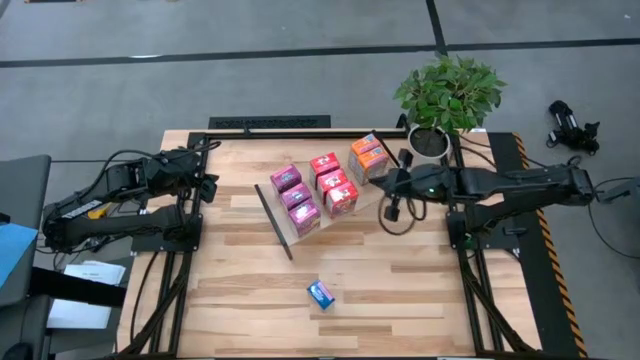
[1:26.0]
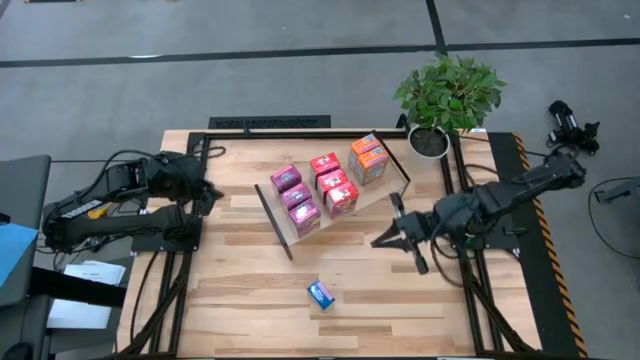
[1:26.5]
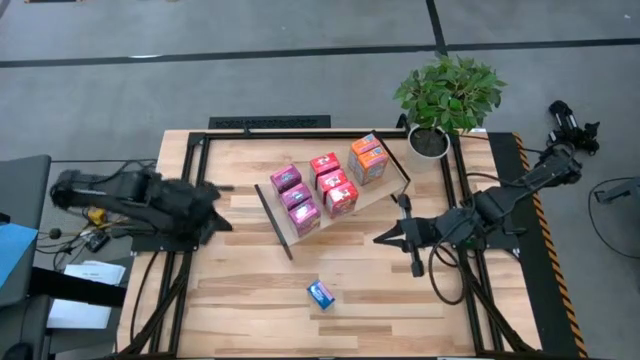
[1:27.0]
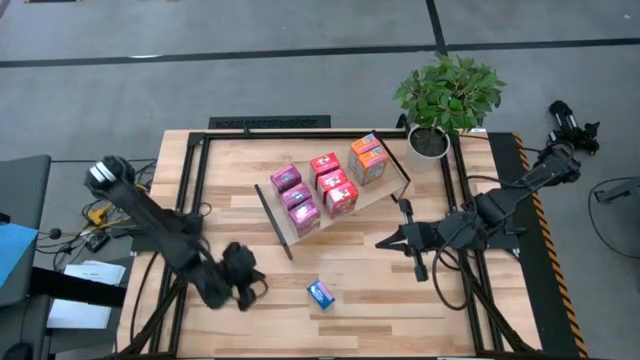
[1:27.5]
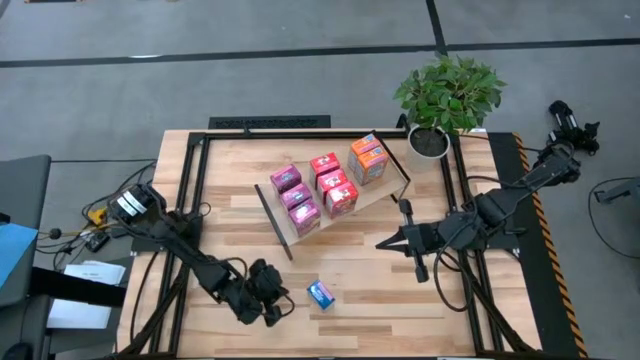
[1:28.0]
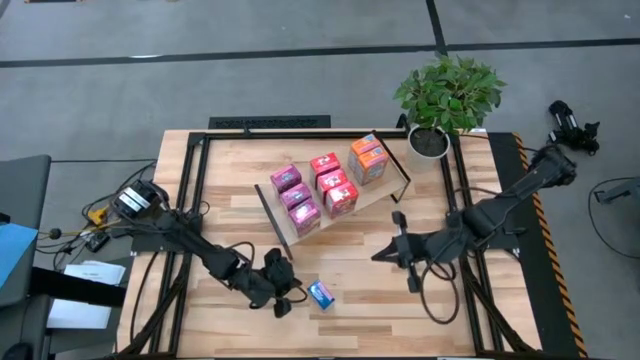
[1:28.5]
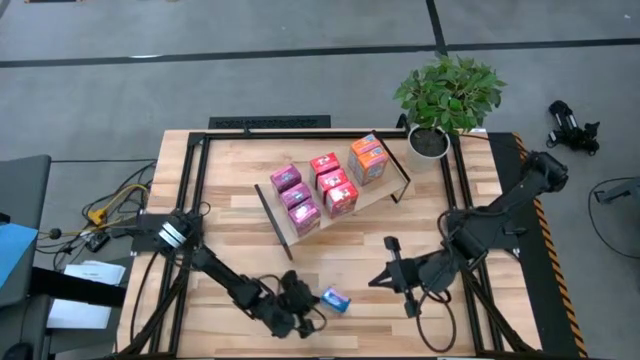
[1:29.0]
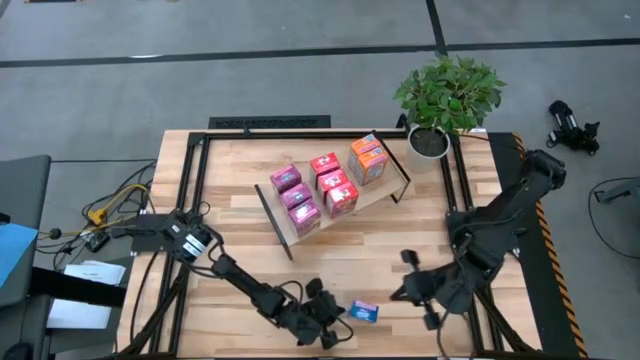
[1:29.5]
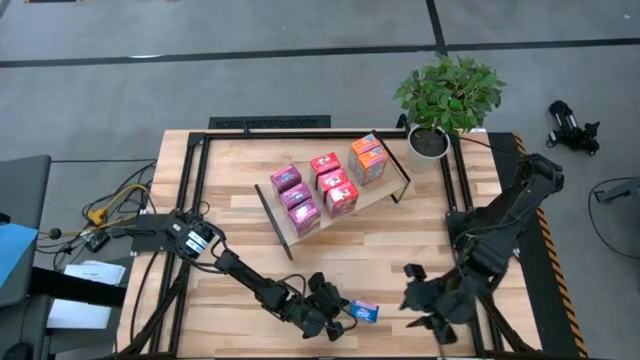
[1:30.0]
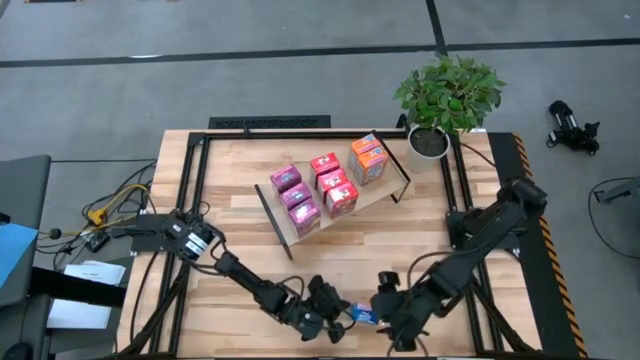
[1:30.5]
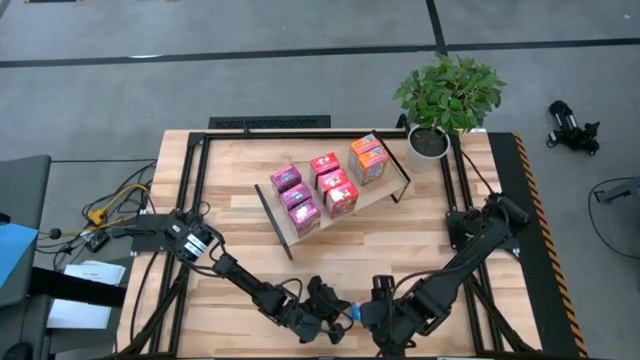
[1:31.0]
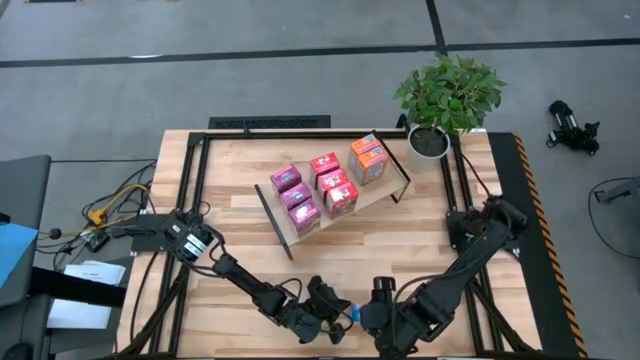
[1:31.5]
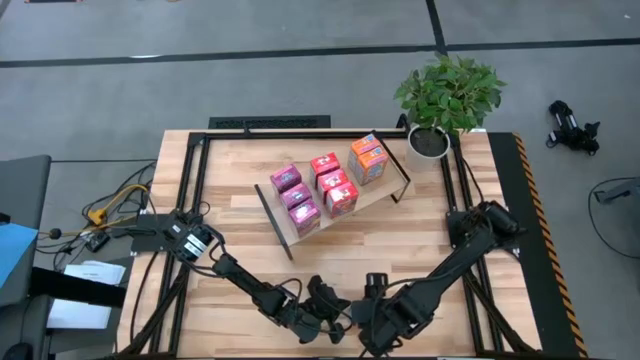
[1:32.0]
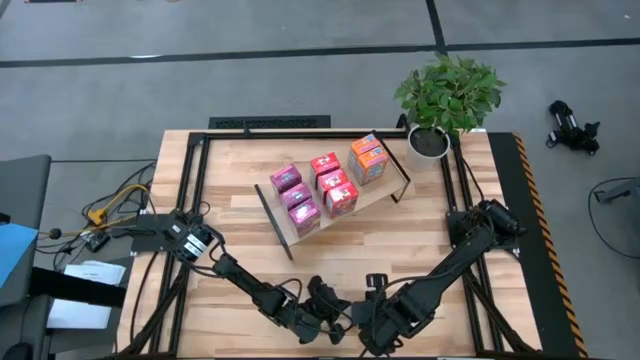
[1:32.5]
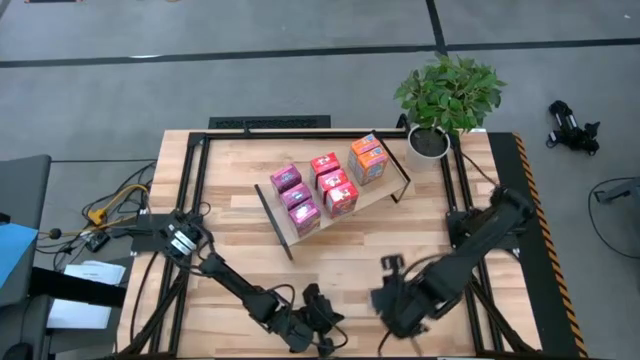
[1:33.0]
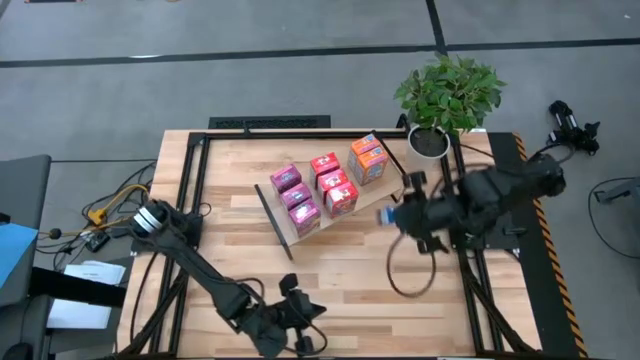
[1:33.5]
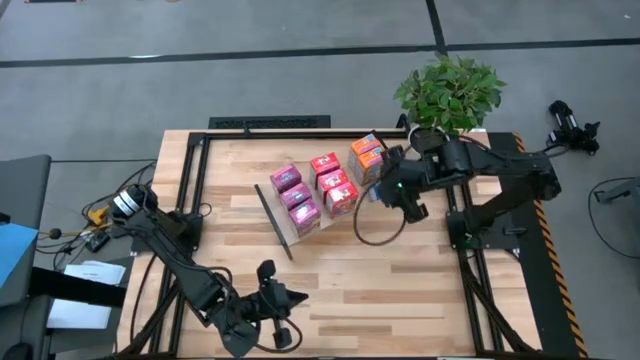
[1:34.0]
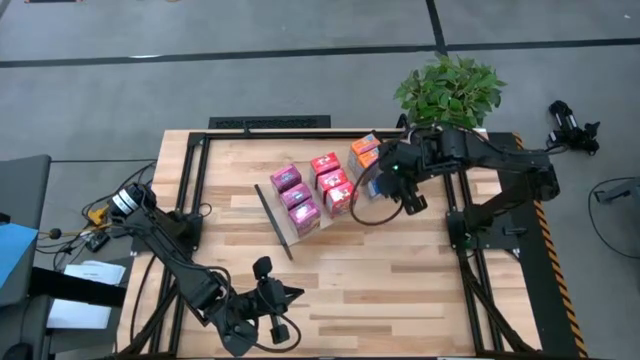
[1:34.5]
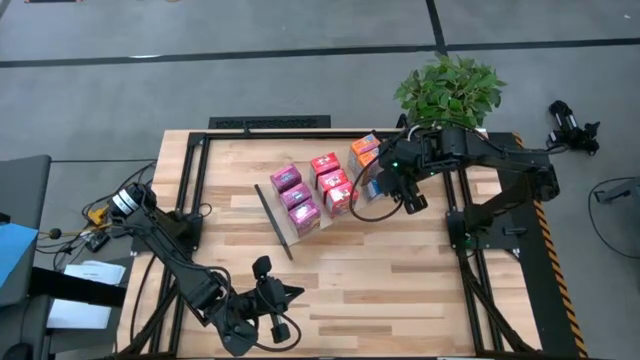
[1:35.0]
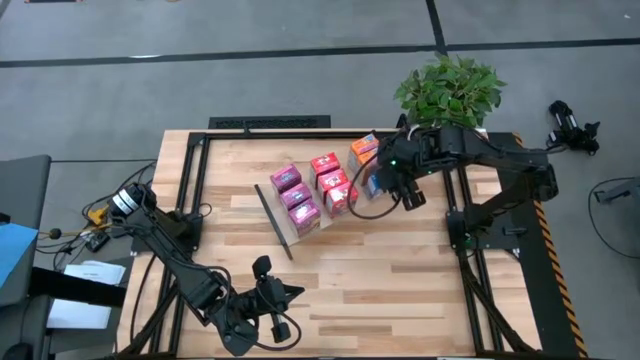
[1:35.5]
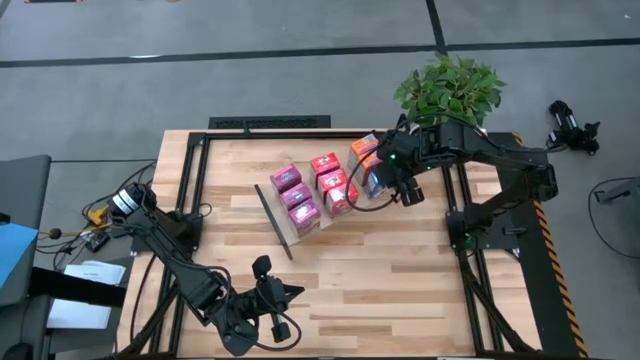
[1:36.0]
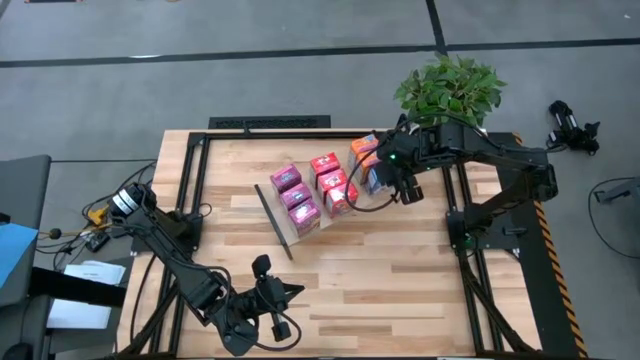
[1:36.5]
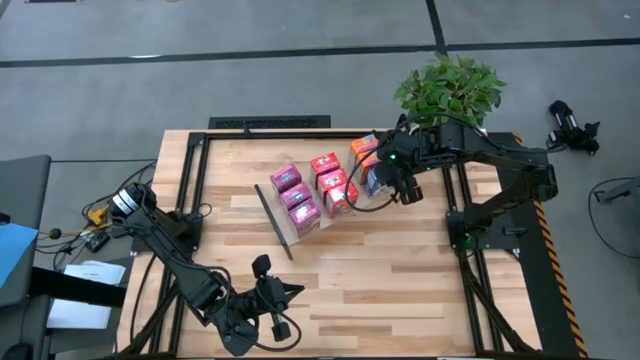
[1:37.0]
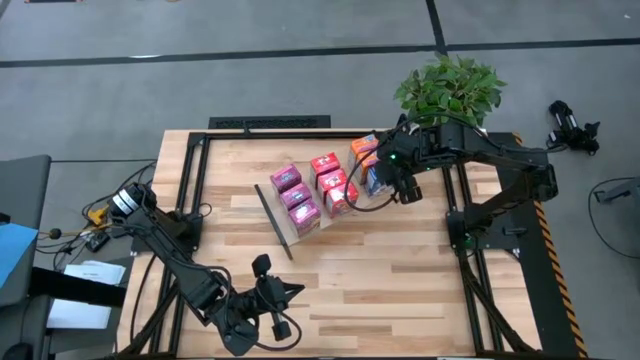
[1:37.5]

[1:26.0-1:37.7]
Task: Stack cereal on shelf
Put the blue cereal box aligned with the other orange cereal boxes on the shelf

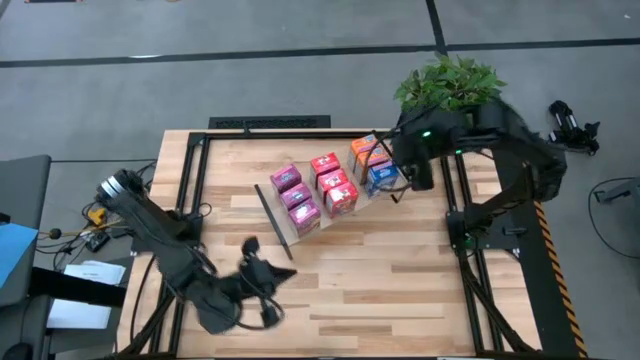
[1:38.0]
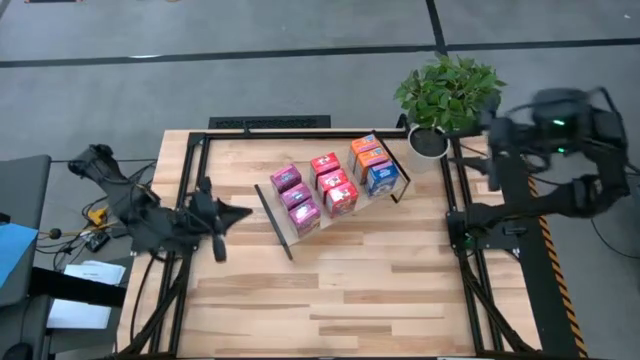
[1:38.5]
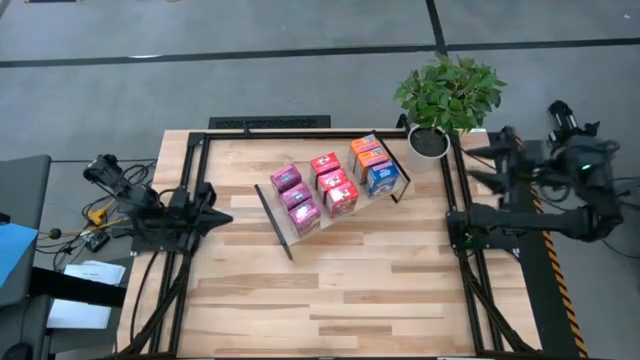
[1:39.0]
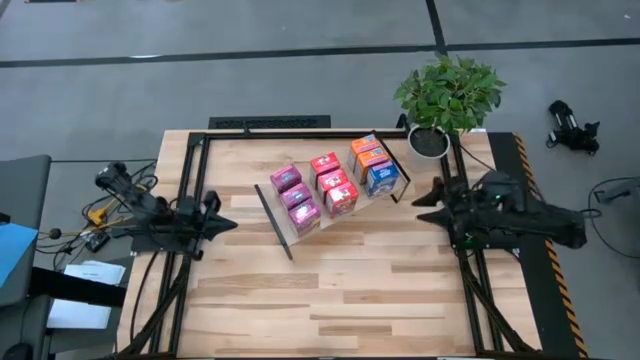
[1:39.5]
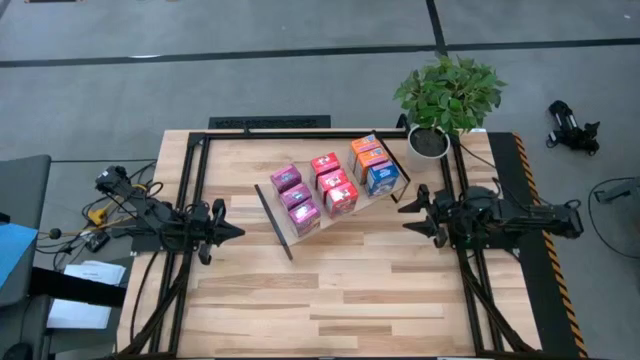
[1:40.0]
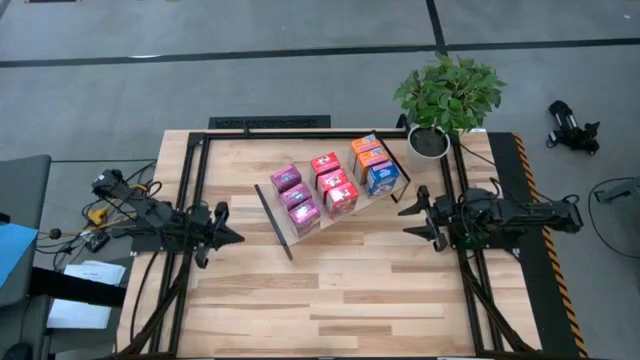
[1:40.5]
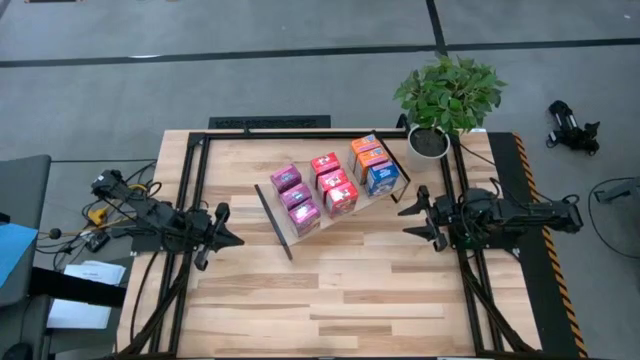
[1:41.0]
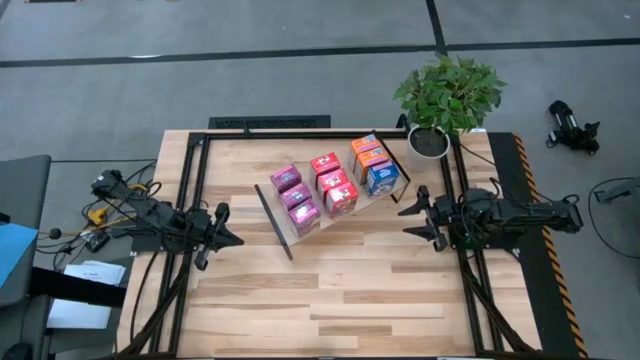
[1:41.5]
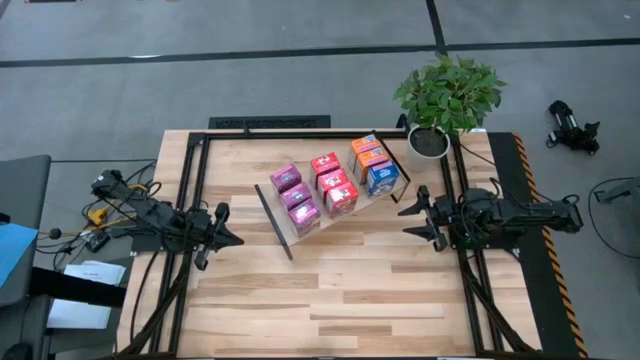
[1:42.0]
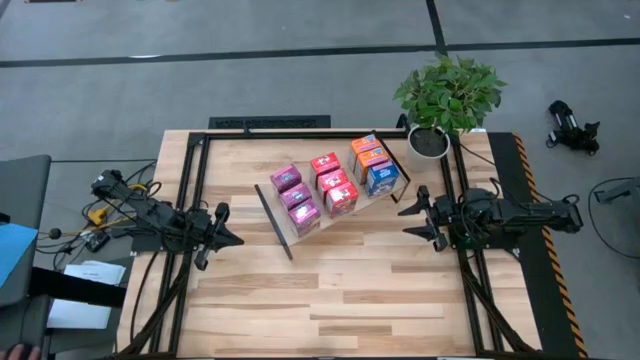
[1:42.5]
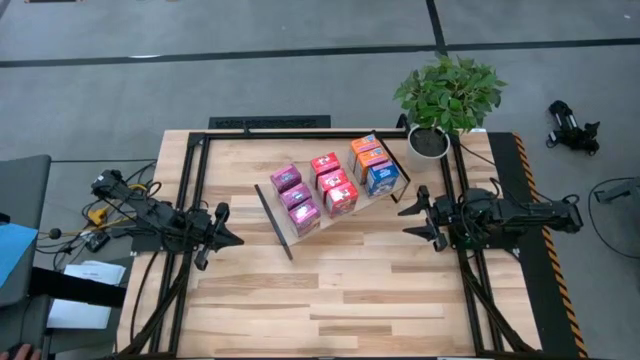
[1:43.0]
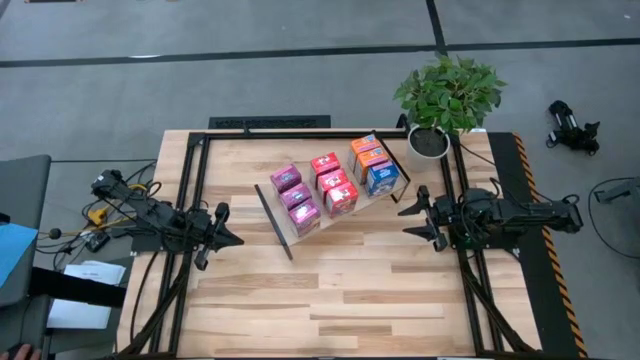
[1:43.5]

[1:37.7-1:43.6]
Return to Home Position

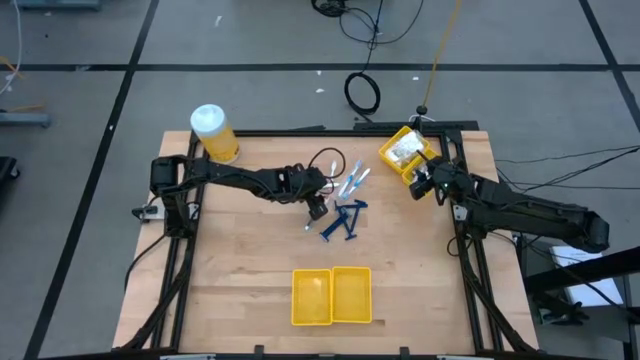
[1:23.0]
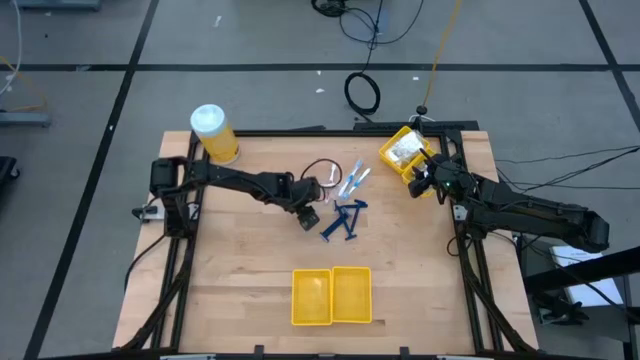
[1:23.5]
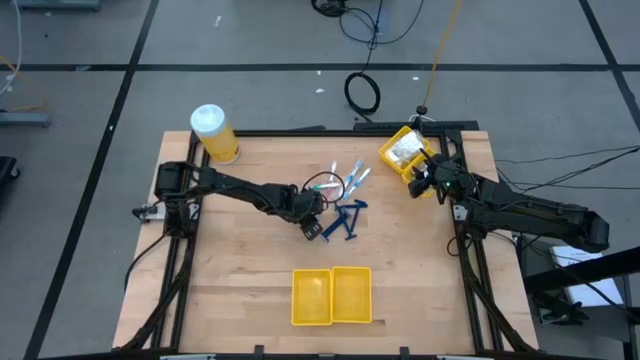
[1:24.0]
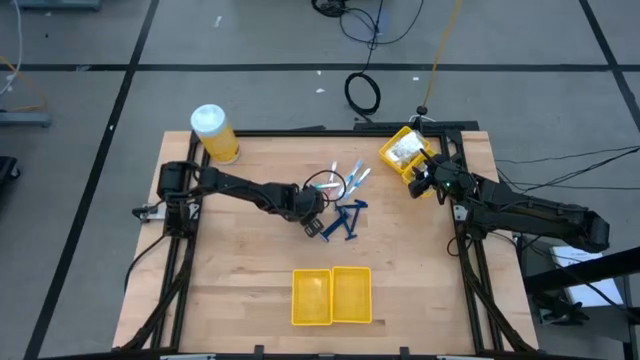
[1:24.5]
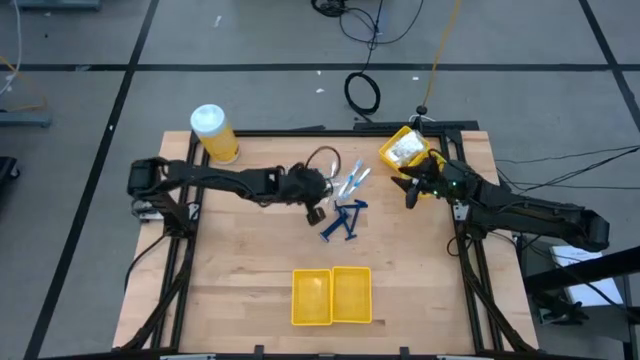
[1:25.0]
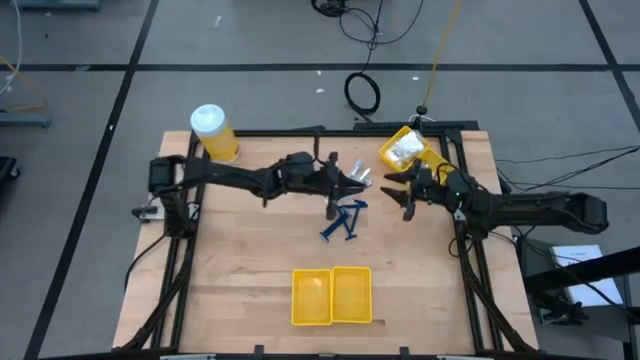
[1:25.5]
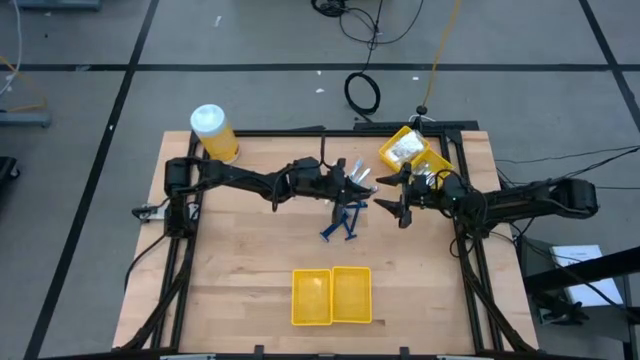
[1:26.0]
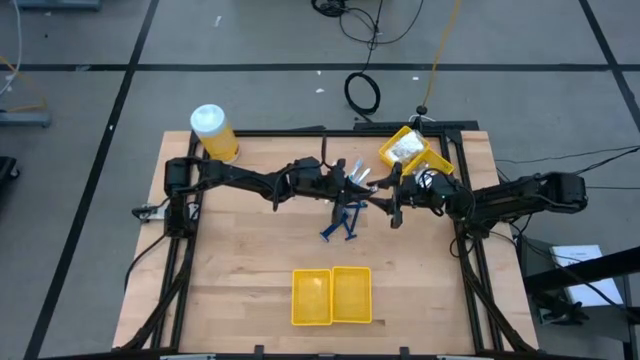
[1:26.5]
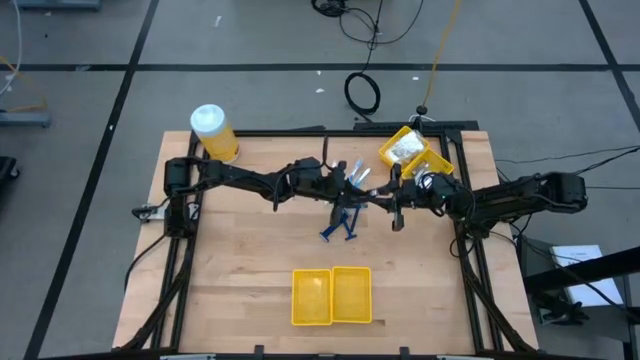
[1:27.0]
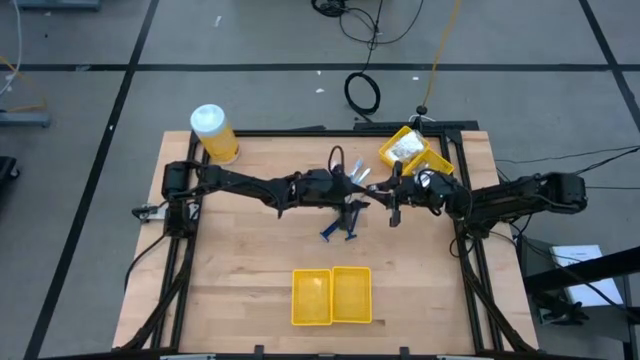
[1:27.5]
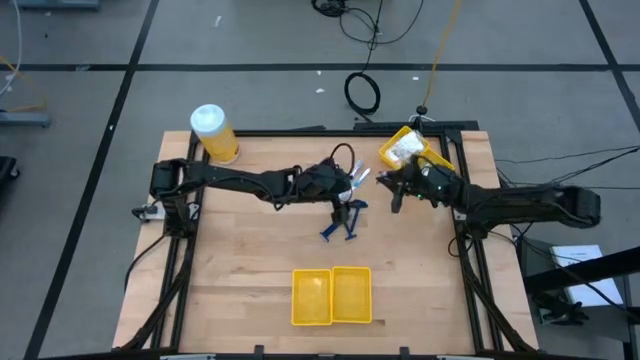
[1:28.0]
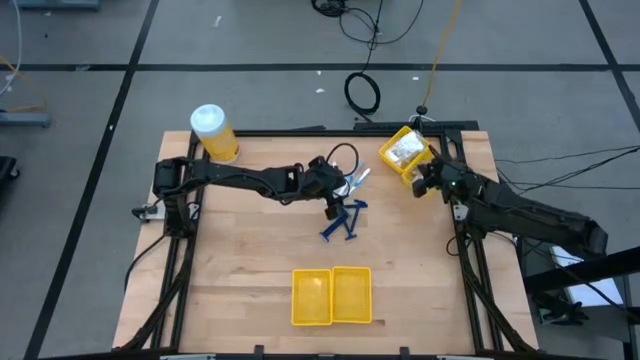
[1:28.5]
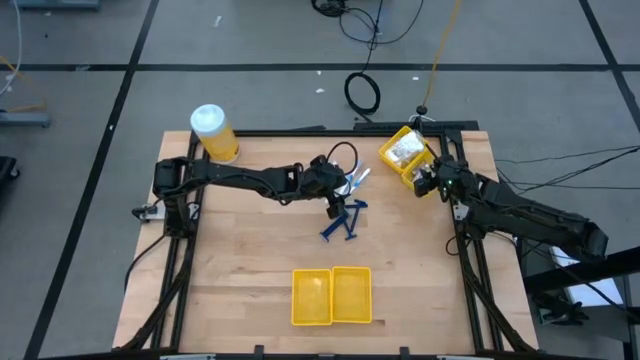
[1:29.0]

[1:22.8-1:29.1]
Task: Pick & Place Travel size toiletries
Put the silver nail cutter into the top right yellow bin
